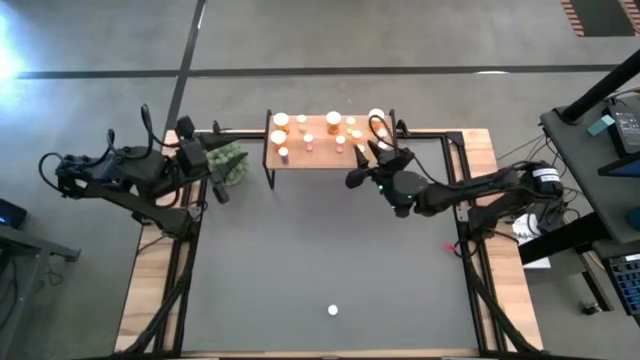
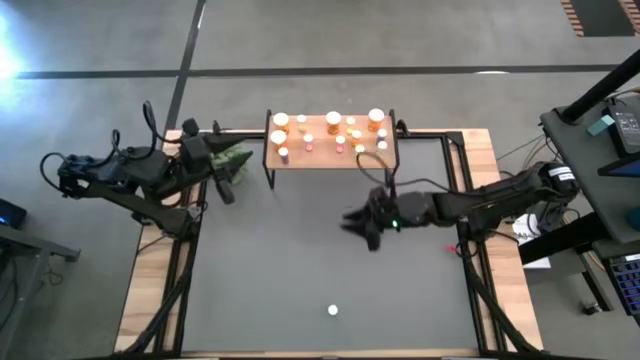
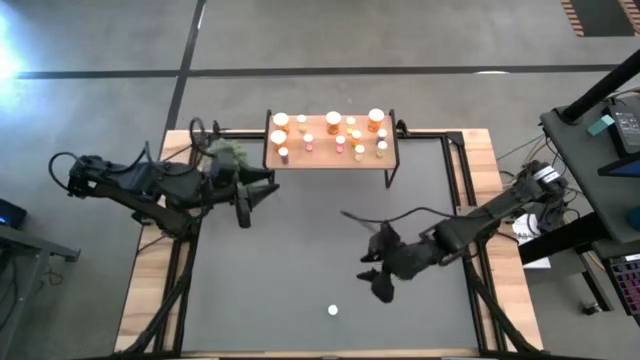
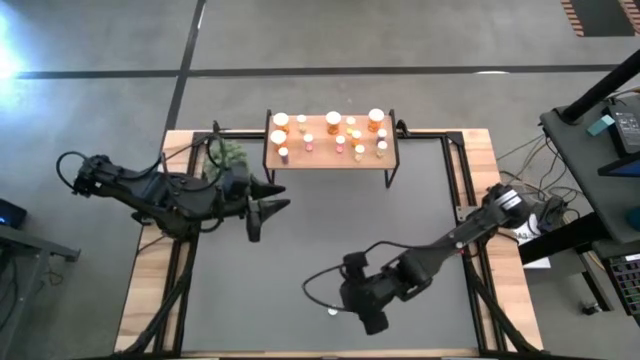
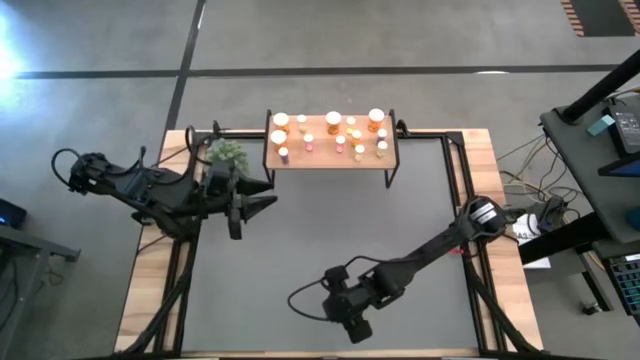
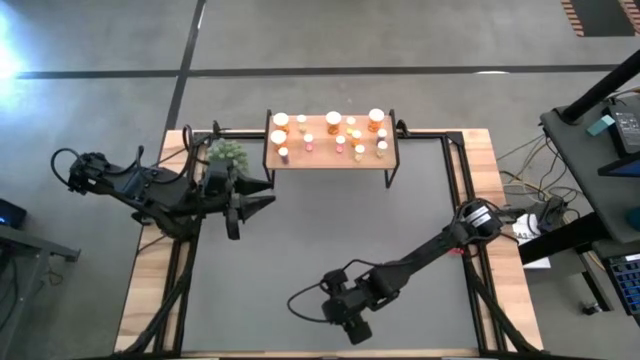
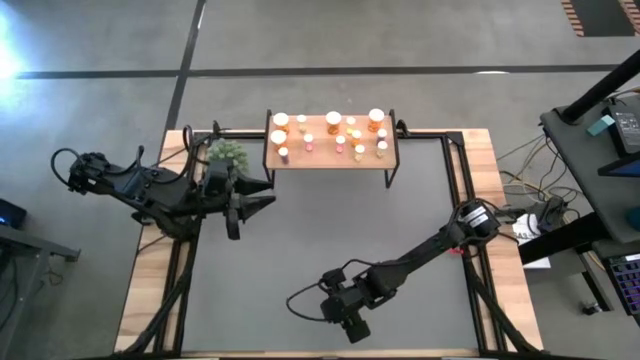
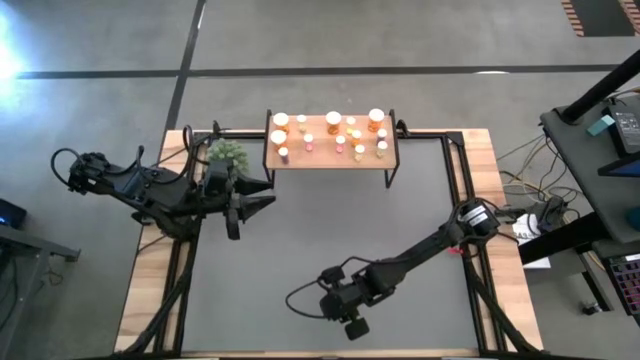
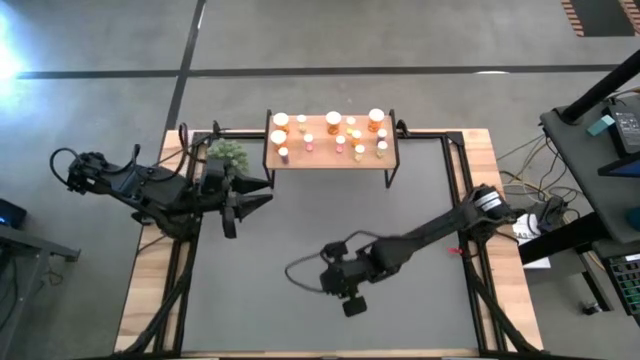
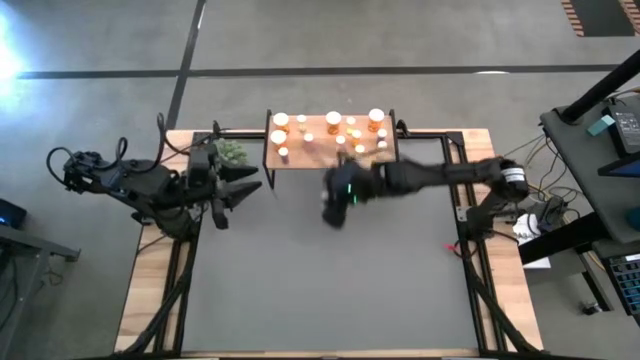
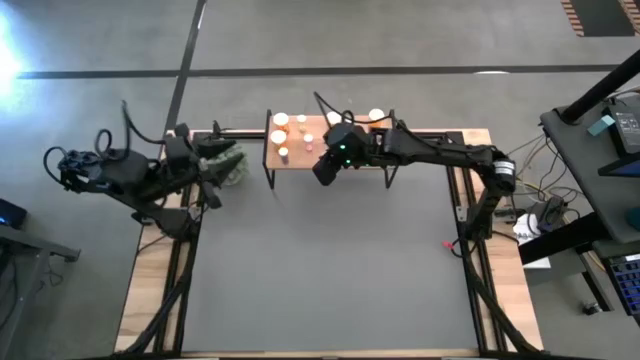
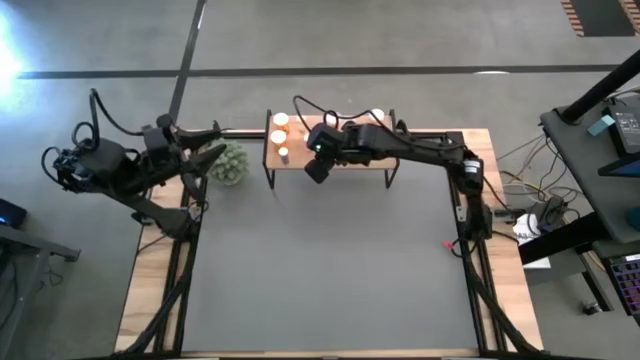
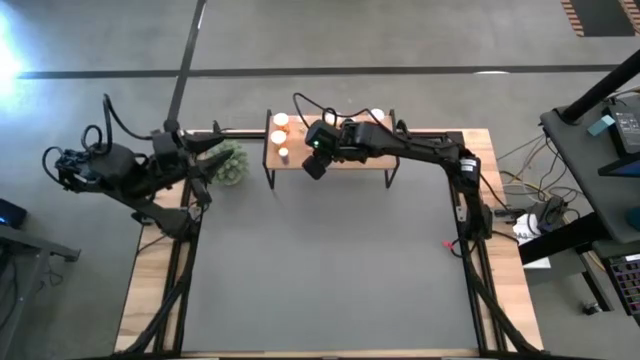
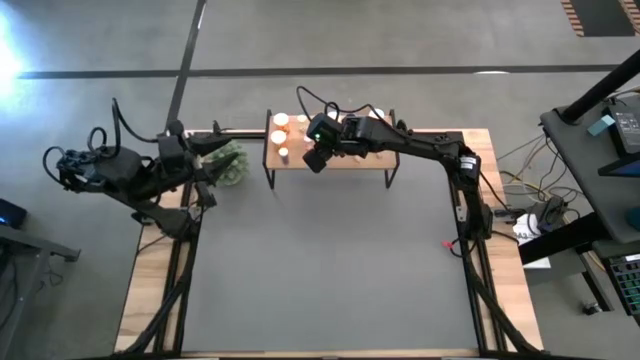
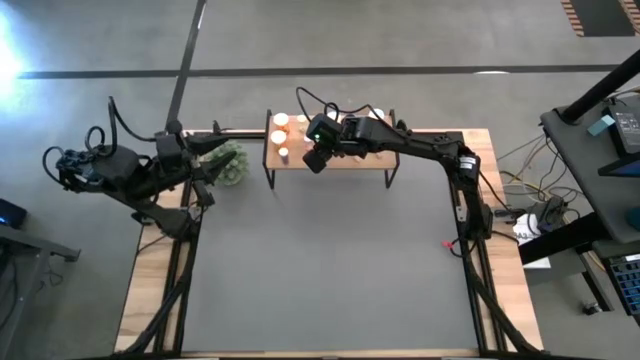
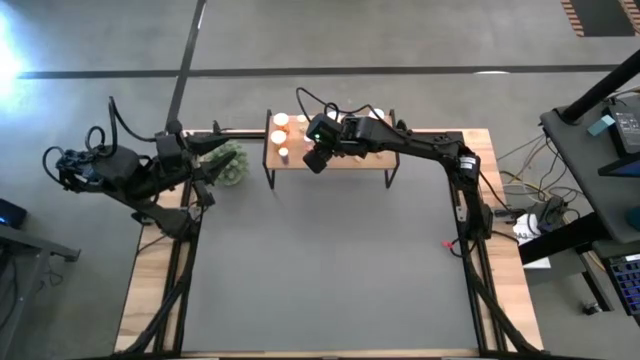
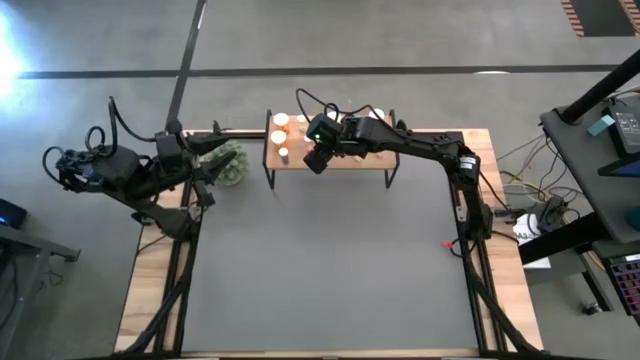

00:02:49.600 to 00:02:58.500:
Task: Pick and place medicine bottles onto shelf by color
Put the small blue pill bottle on the shelf

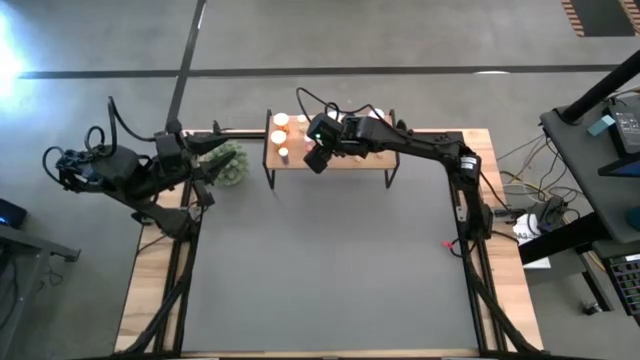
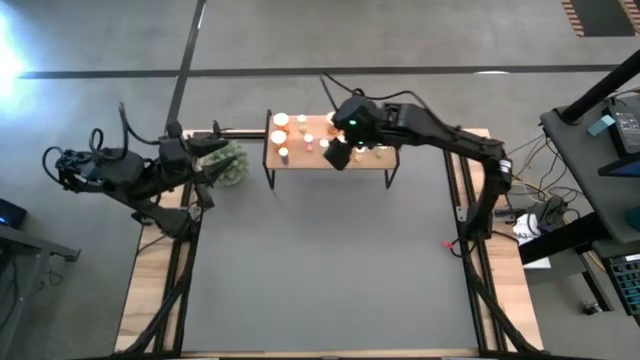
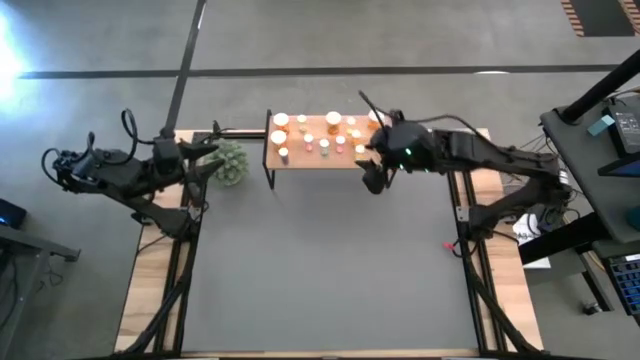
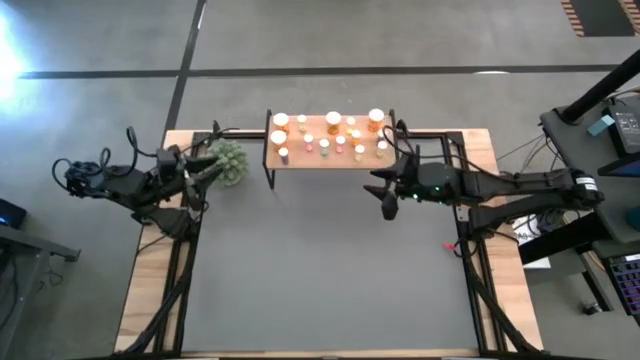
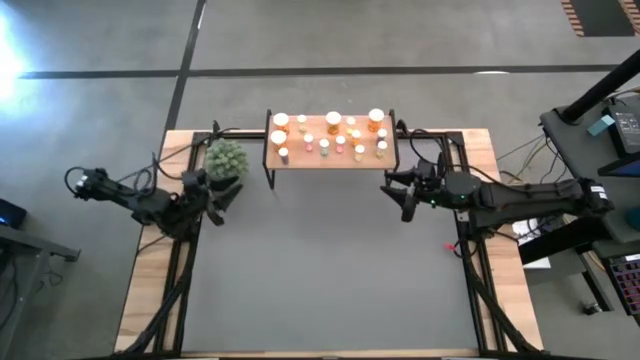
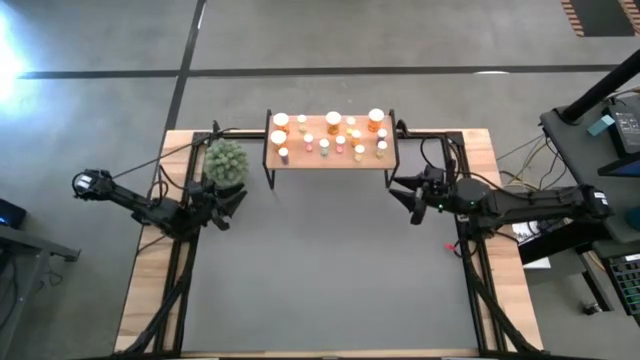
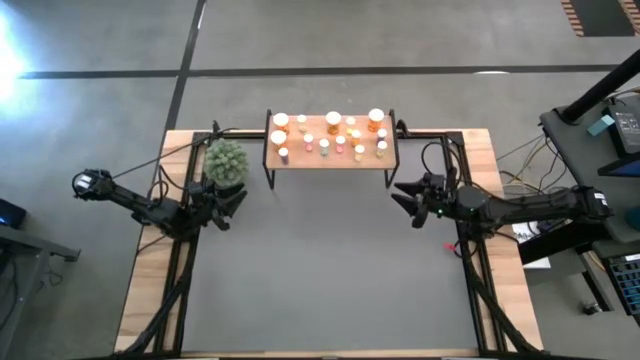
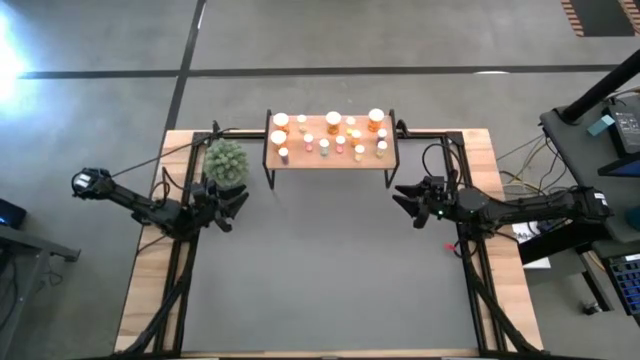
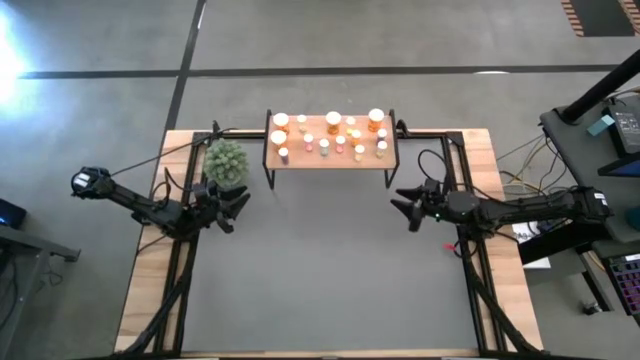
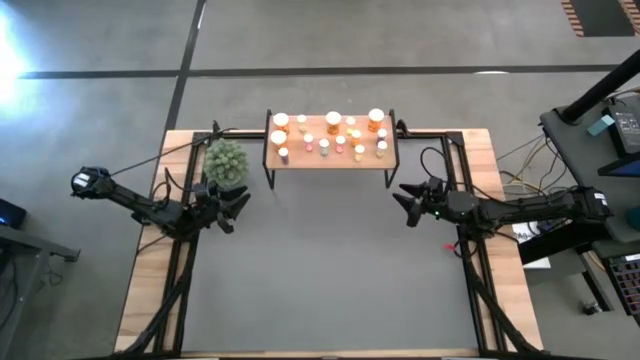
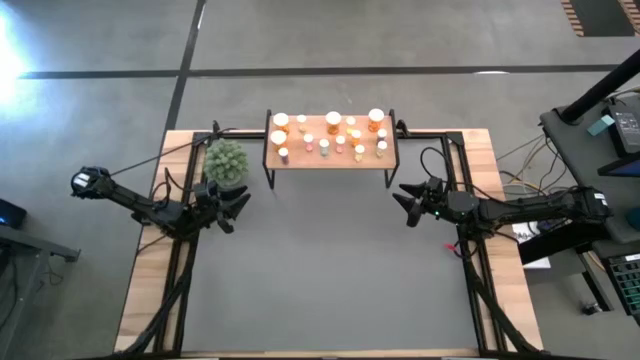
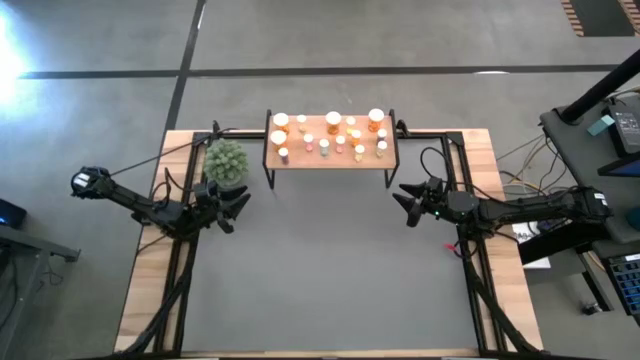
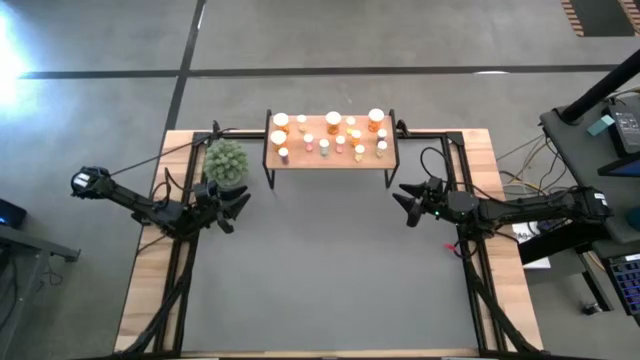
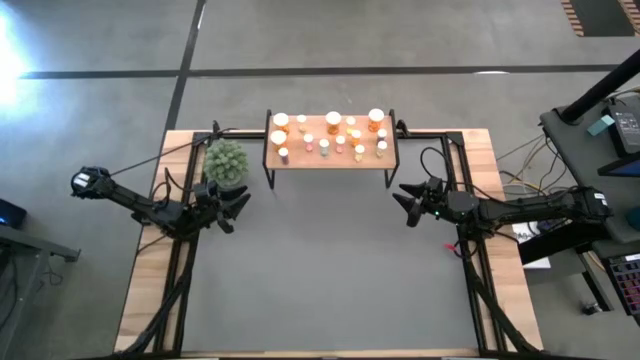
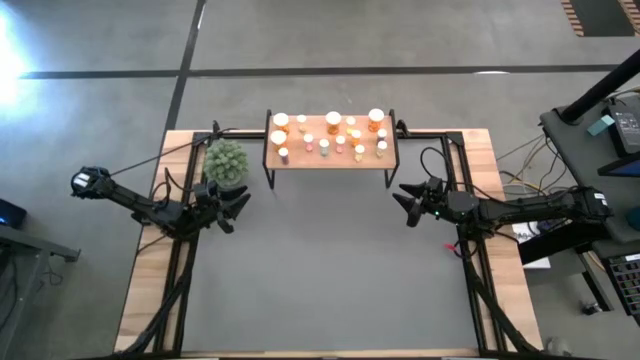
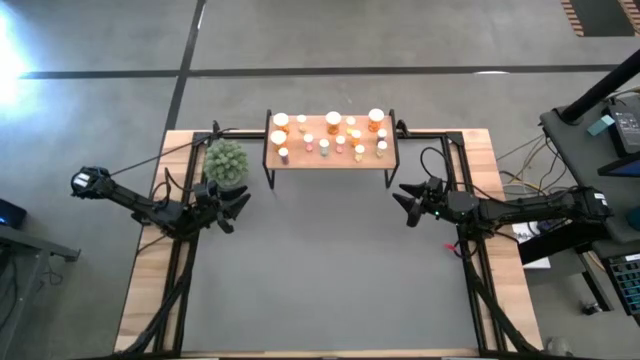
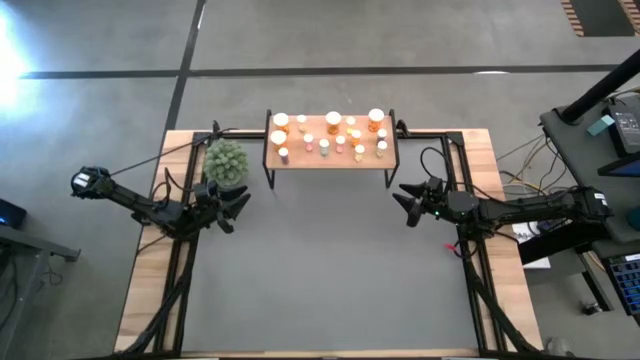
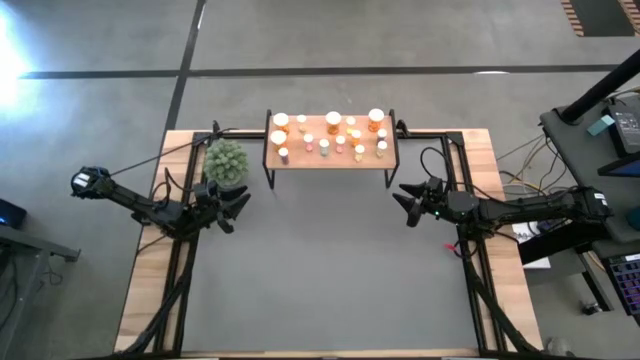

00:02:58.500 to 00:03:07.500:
Return to Home Position

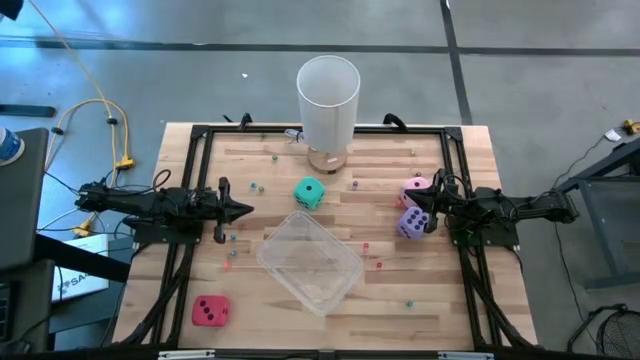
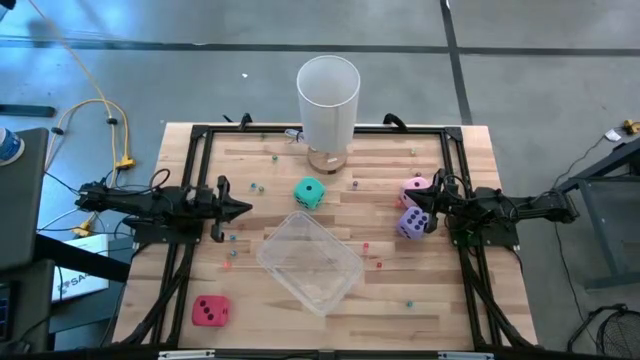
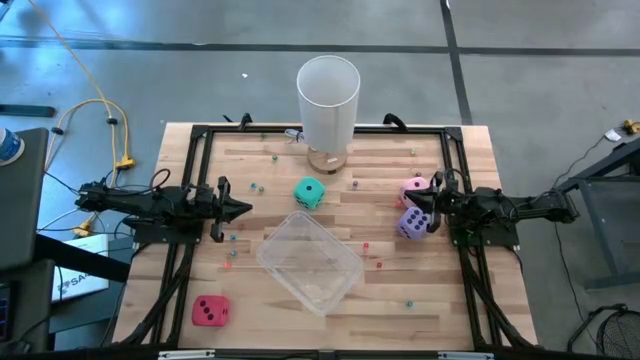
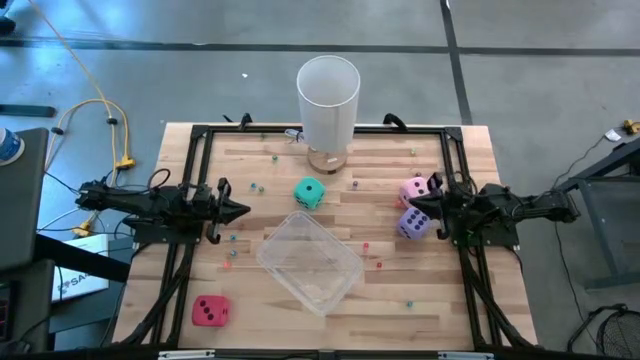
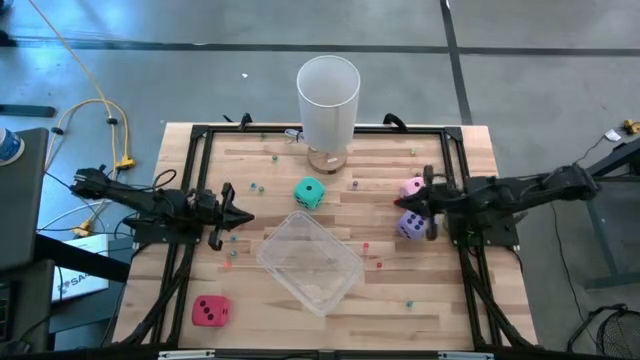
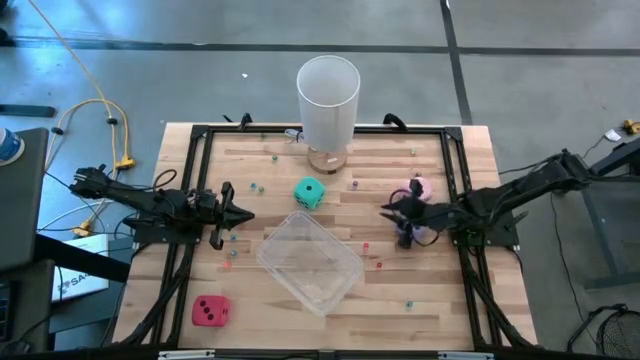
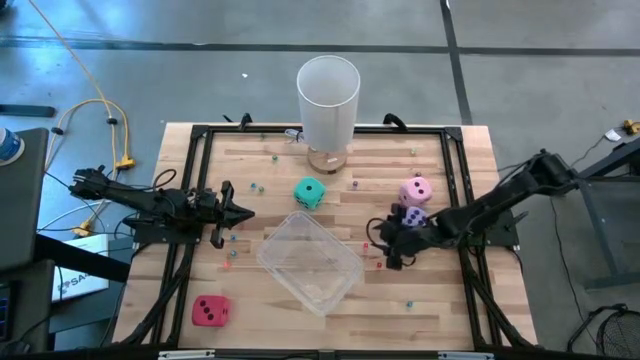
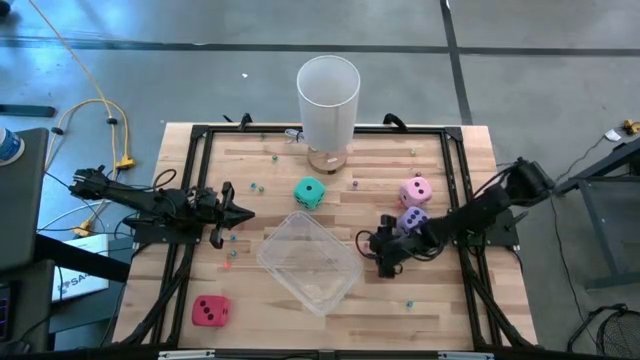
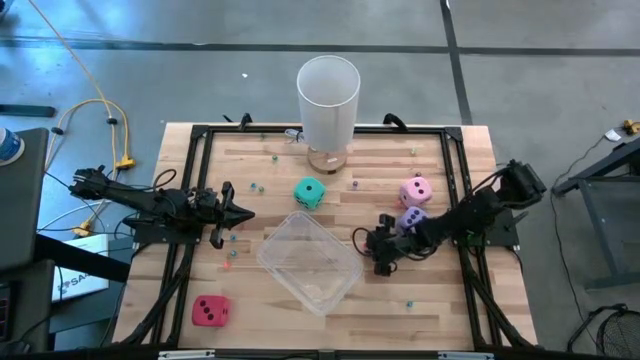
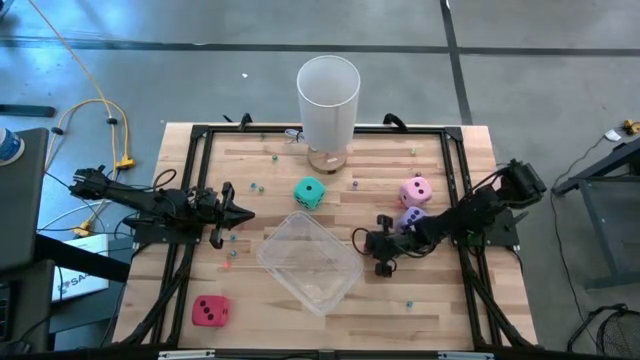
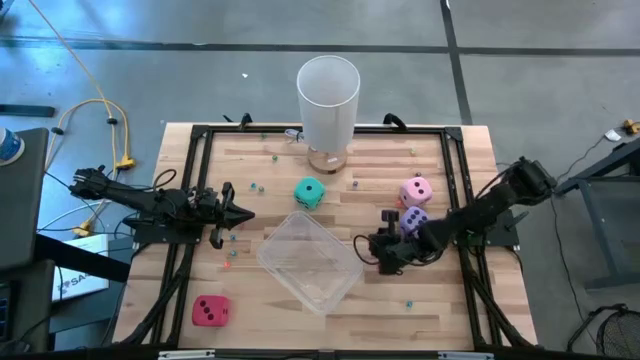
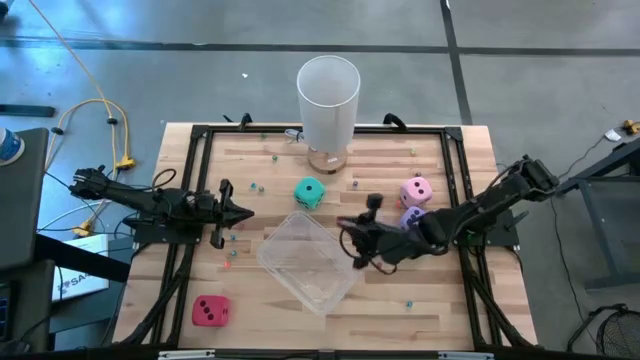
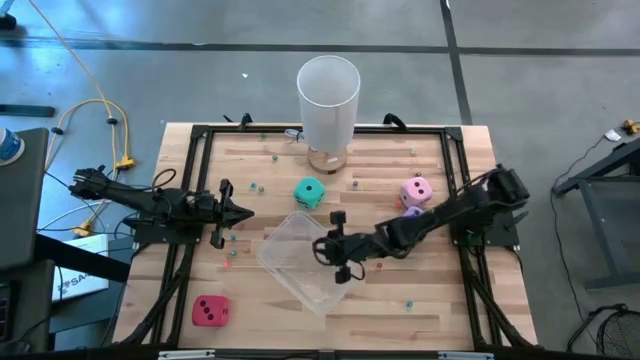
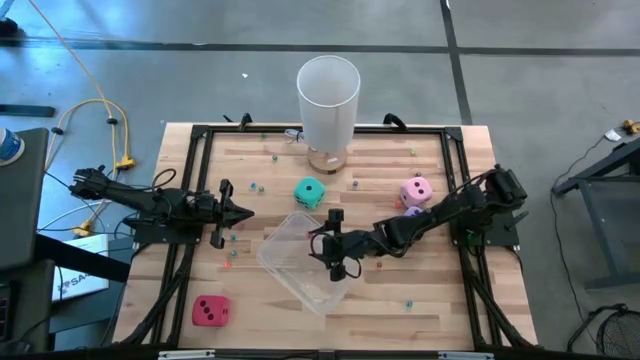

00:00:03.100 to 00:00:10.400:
Task: Pick & Place Dice
Put the small red dice into the transparent bin
